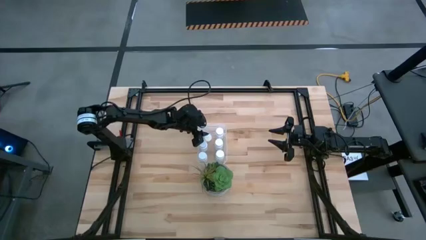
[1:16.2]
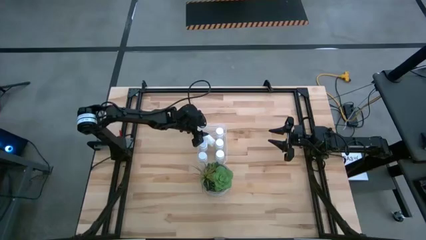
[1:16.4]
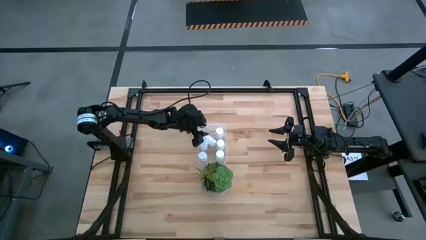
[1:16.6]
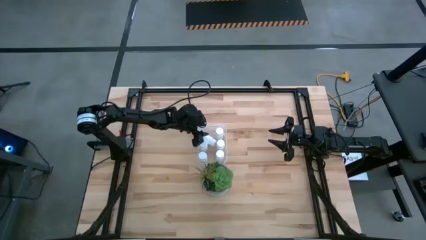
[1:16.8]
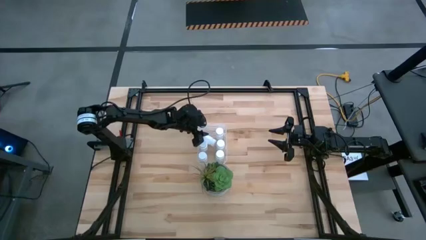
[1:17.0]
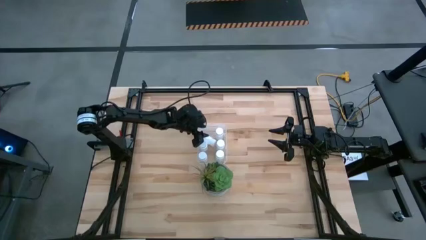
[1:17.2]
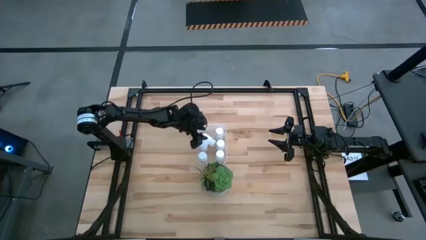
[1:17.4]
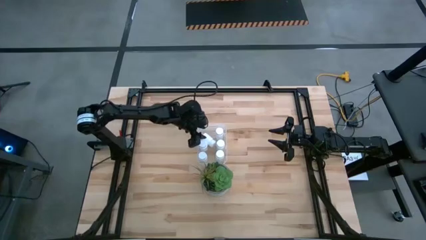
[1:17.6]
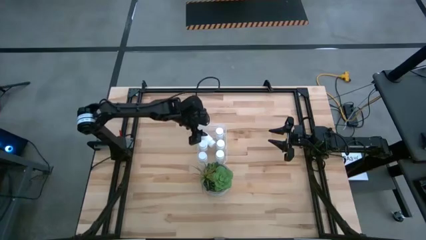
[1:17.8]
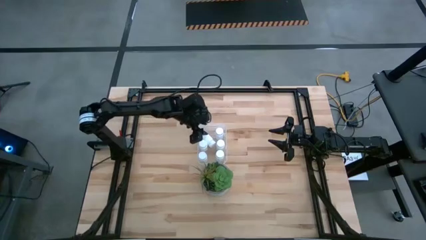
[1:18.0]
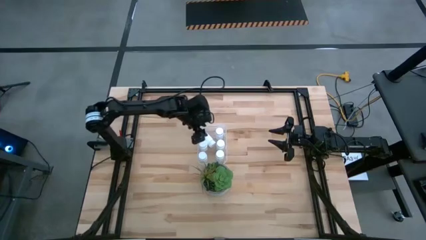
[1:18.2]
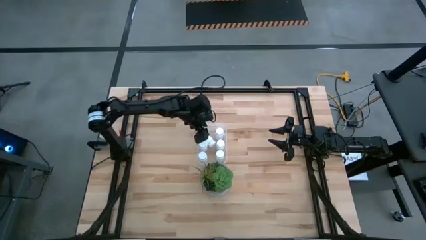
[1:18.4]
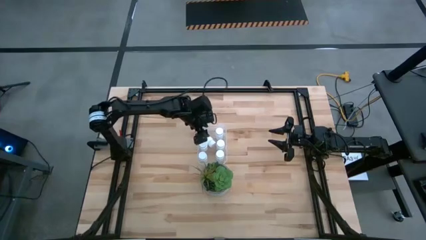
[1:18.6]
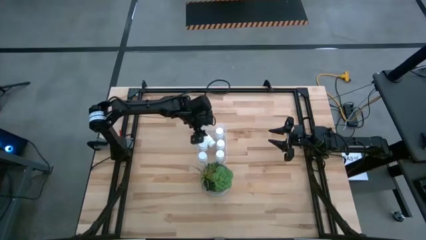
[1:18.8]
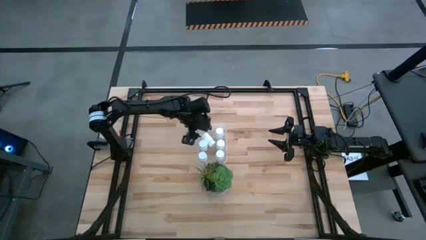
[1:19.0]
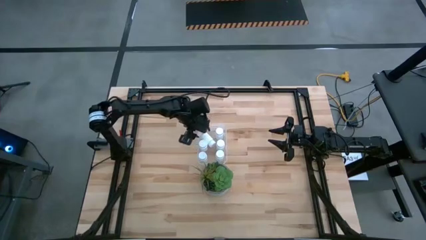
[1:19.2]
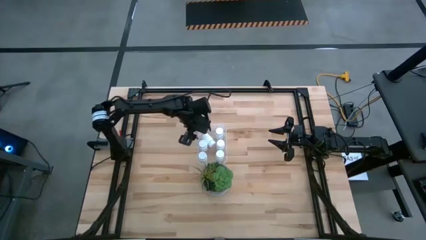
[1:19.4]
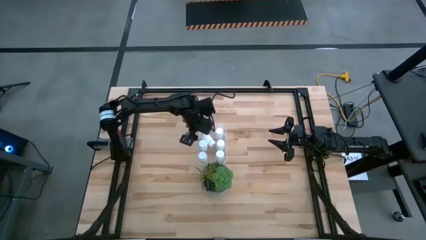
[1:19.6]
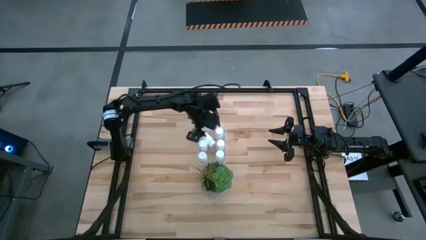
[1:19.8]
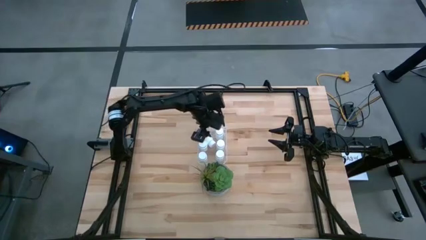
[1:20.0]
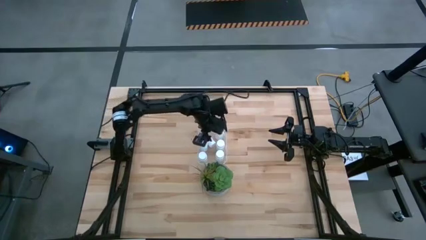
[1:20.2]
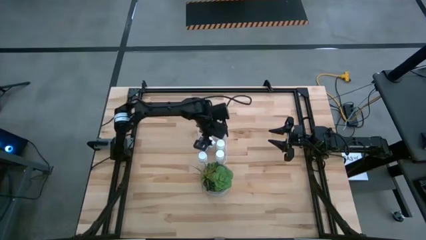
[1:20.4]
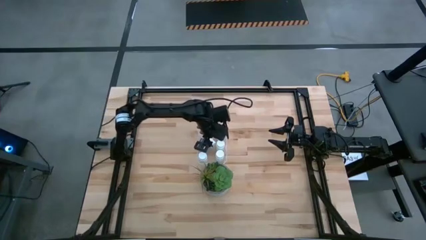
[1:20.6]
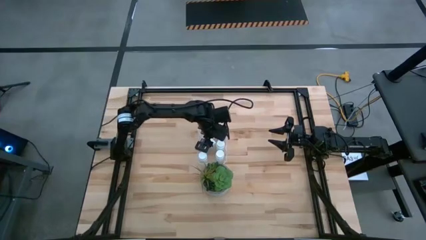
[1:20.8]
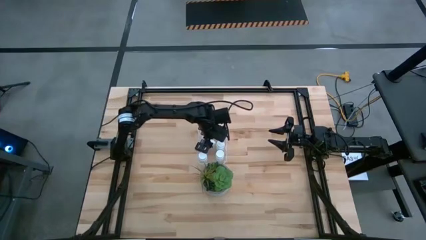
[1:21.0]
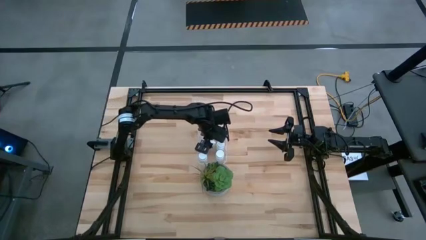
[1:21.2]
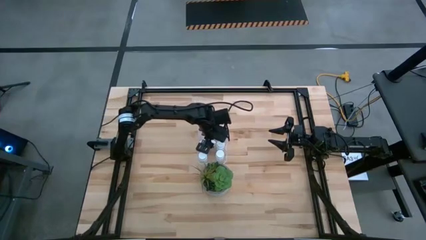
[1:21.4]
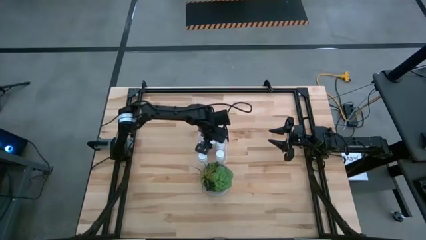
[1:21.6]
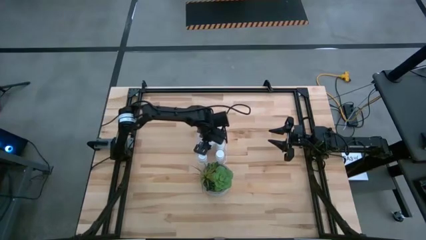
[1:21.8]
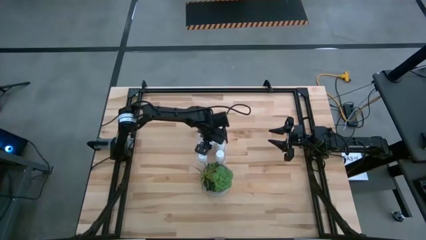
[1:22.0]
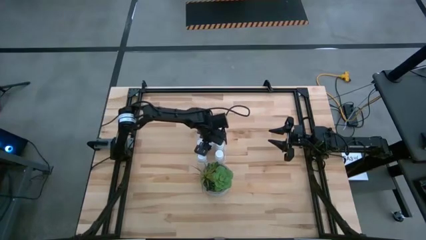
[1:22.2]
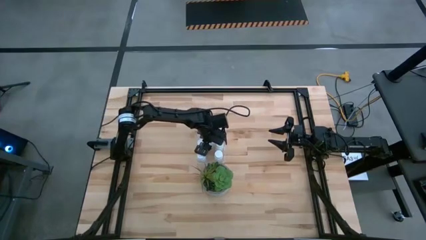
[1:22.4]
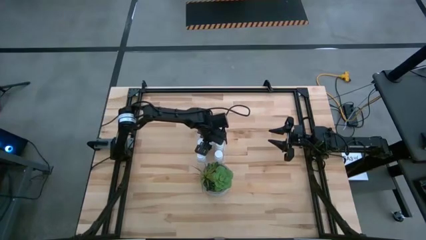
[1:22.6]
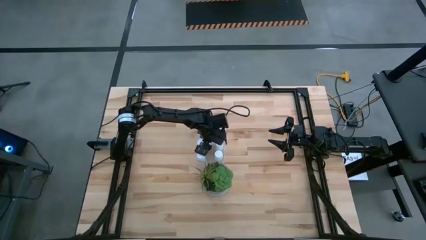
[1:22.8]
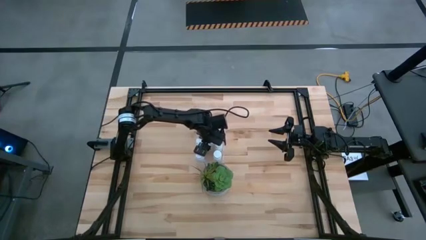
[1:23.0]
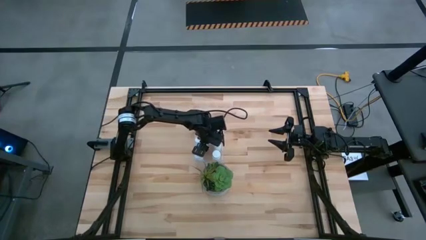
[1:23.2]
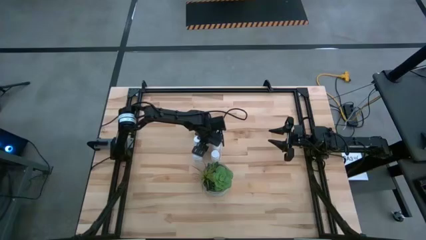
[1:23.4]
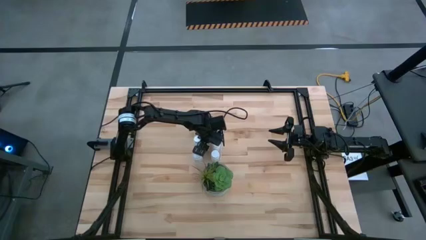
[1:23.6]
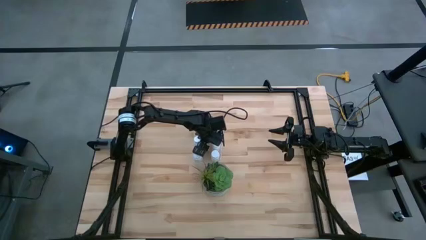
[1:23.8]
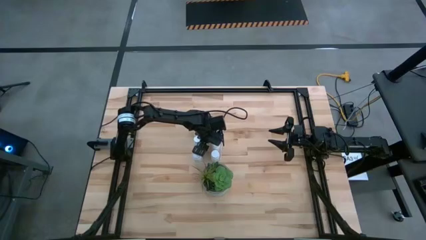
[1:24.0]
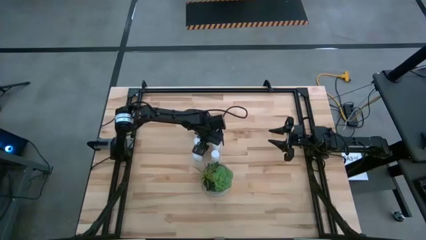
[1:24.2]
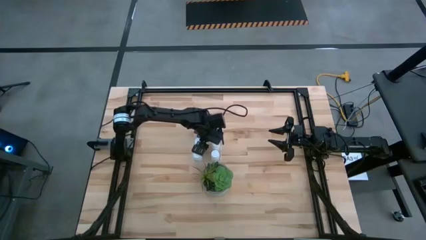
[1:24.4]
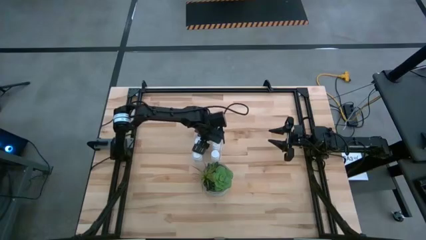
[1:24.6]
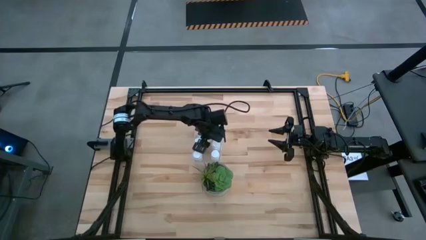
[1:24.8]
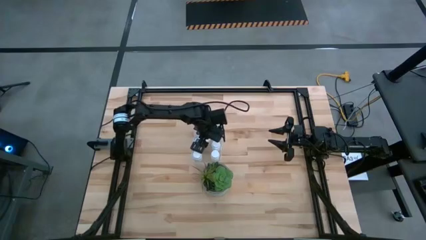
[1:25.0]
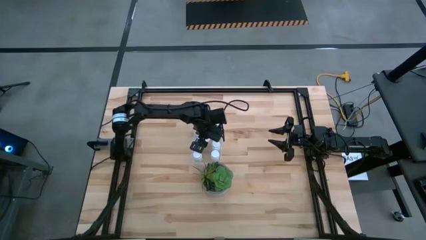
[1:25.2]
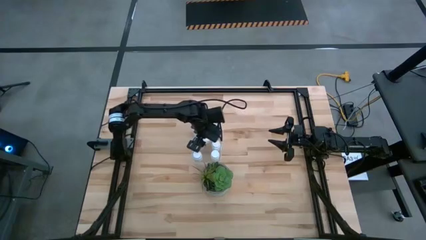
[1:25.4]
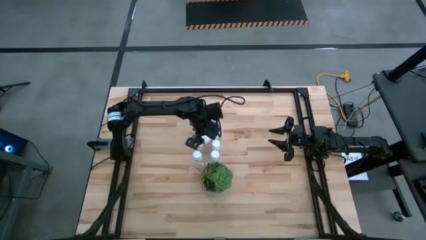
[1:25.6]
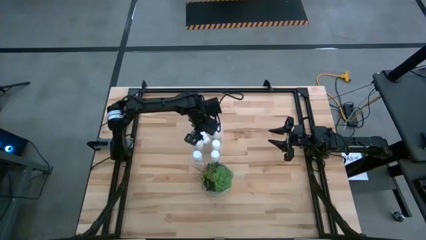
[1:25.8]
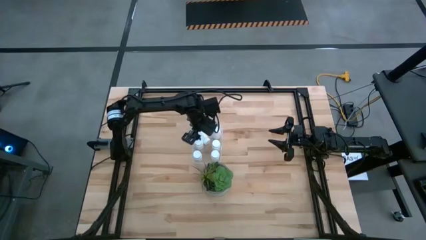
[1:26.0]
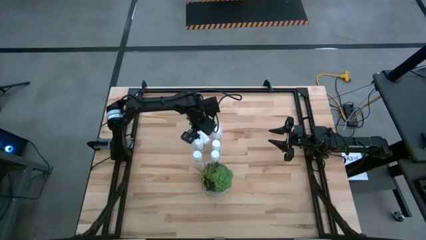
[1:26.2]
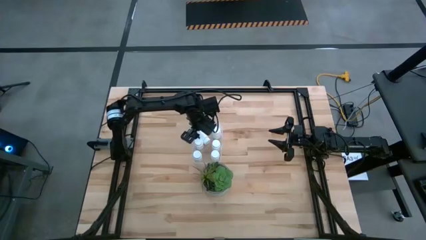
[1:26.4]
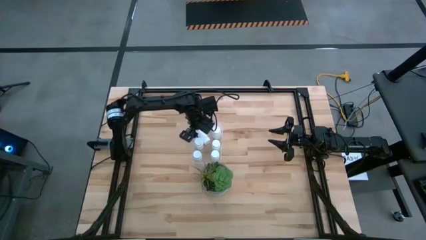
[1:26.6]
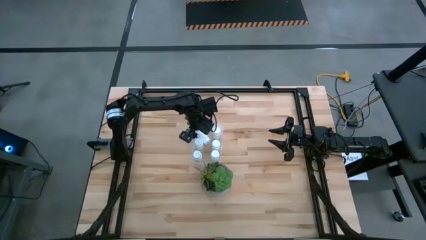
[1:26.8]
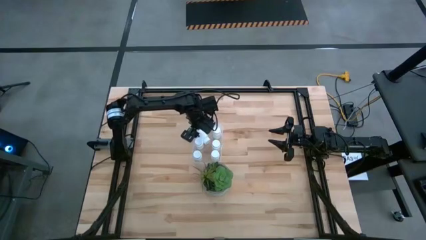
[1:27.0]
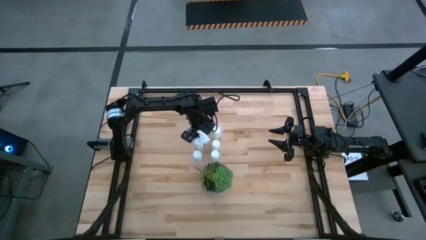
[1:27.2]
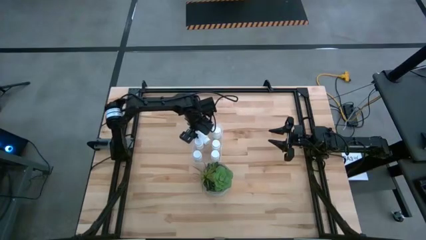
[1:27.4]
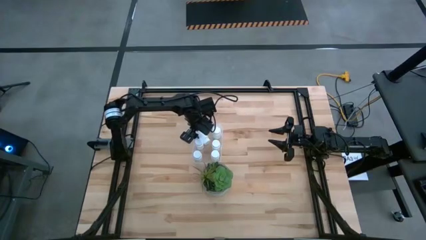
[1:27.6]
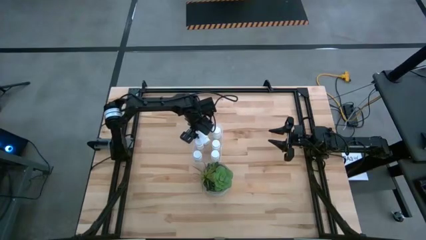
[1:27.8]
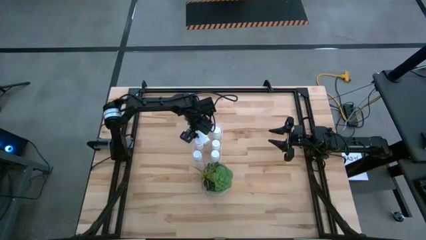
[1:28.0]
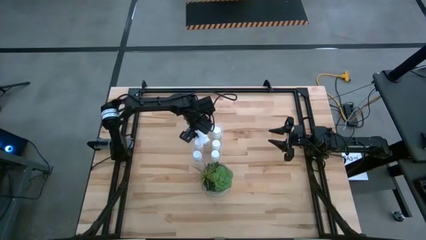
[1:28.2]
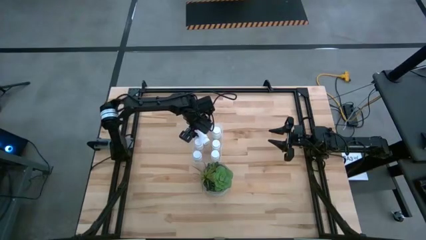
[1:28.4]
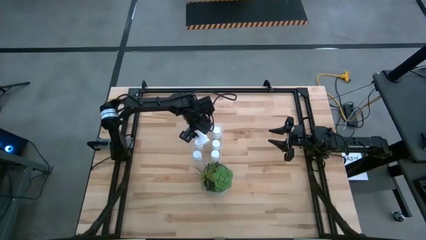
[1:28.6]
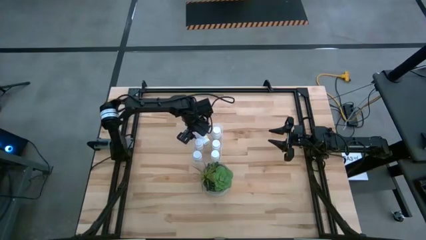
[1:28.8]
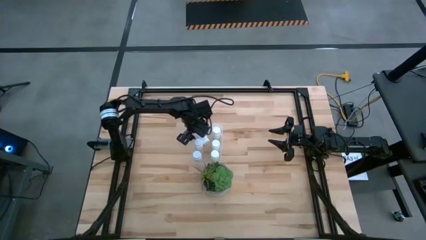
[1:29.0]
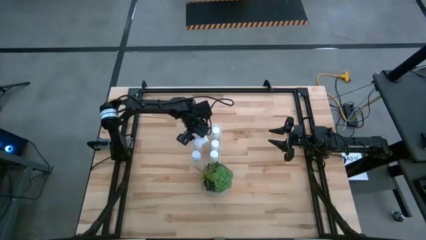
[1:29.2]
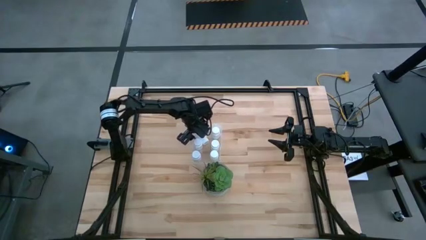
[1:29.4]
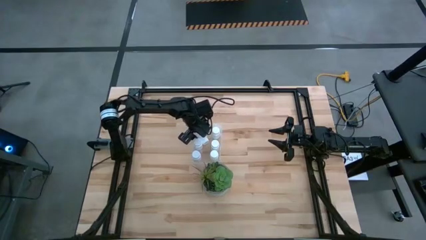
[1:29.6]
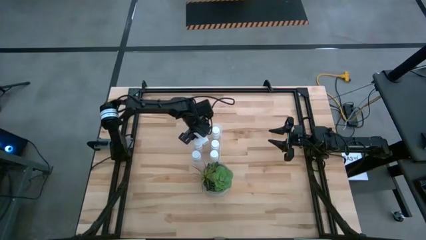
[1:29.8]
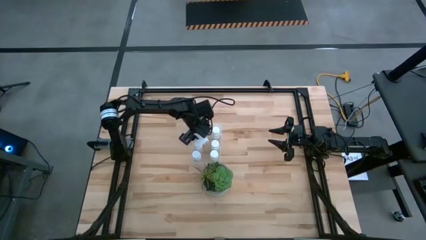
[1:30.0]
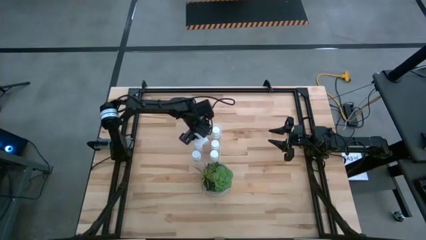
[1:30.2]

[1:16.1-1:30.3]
Task: Pick and place pill bottles into a basket
Put the white pill bottle into the transparent bin

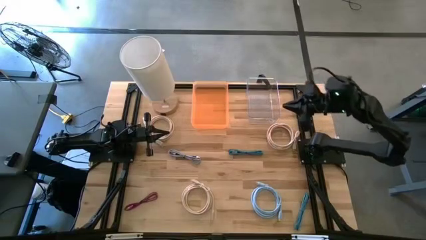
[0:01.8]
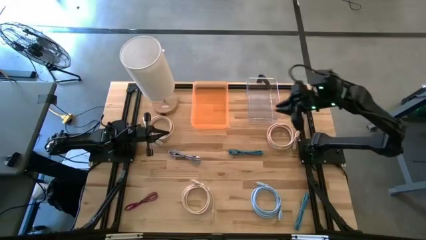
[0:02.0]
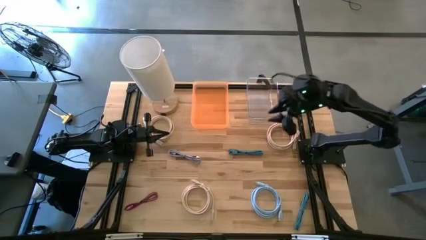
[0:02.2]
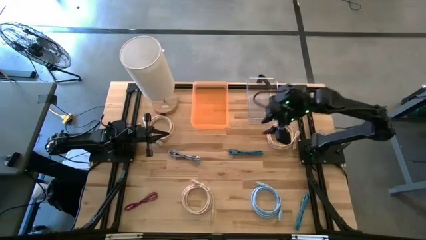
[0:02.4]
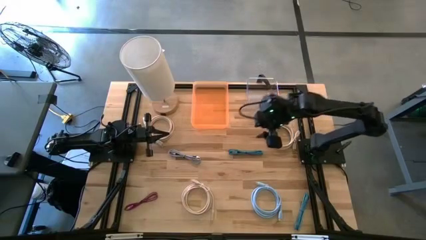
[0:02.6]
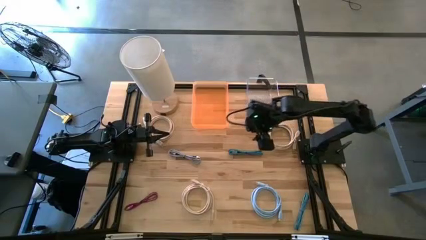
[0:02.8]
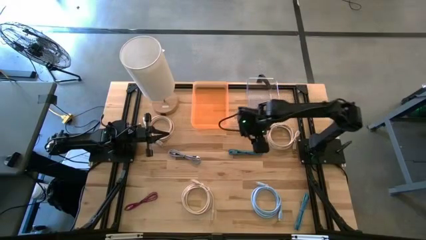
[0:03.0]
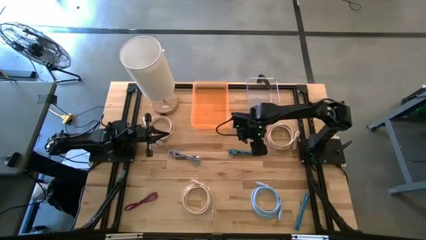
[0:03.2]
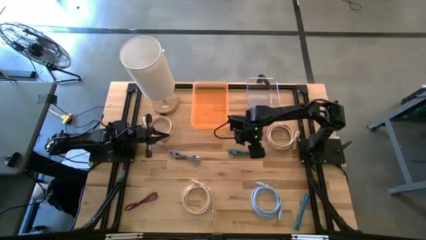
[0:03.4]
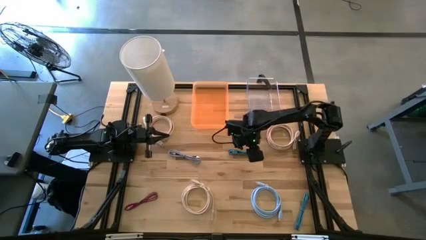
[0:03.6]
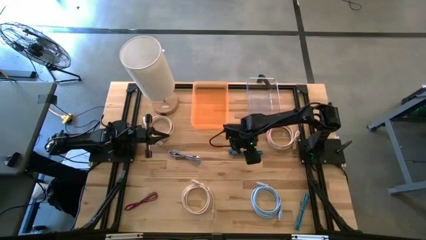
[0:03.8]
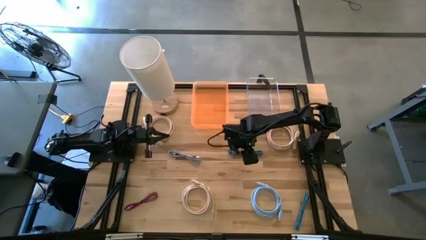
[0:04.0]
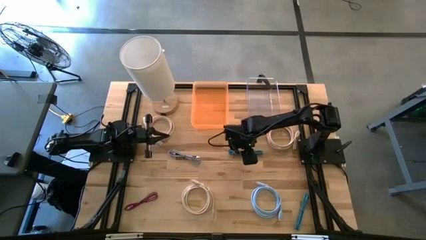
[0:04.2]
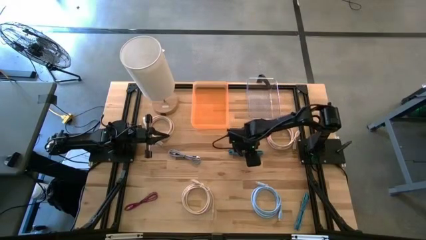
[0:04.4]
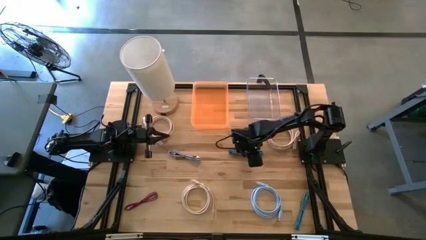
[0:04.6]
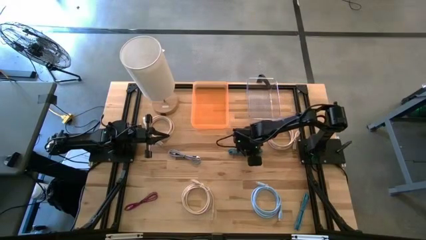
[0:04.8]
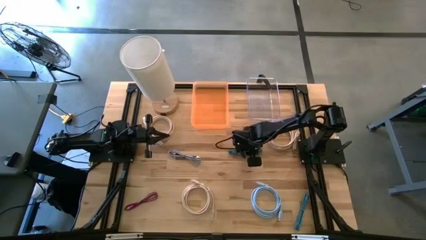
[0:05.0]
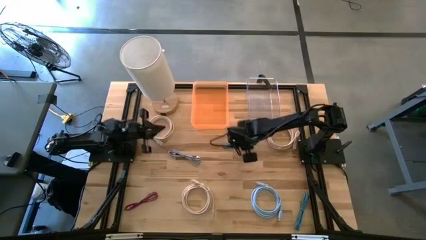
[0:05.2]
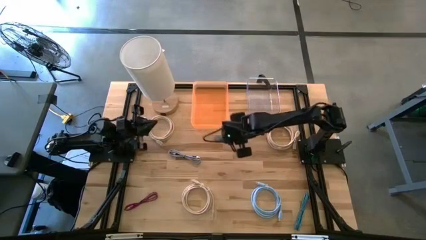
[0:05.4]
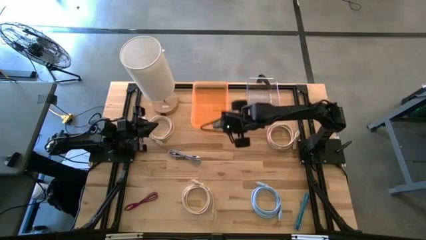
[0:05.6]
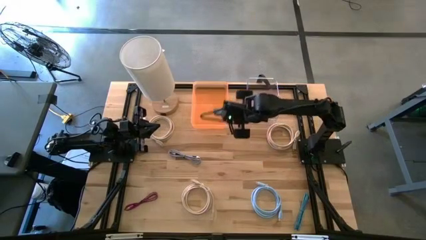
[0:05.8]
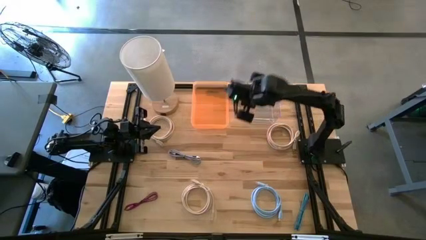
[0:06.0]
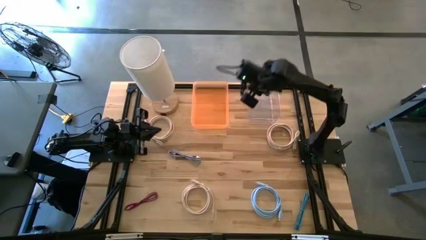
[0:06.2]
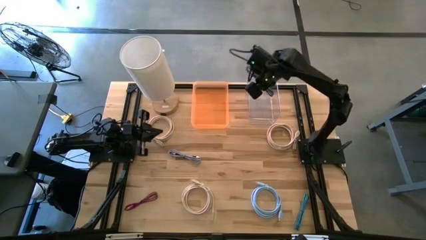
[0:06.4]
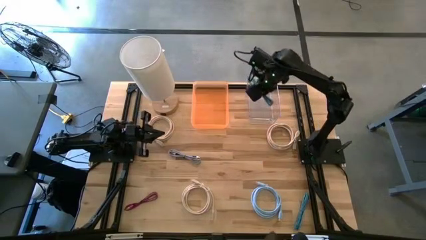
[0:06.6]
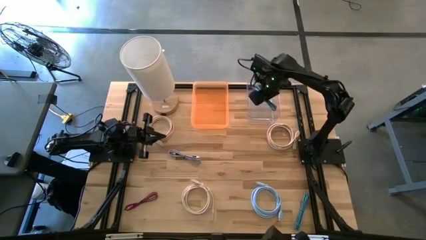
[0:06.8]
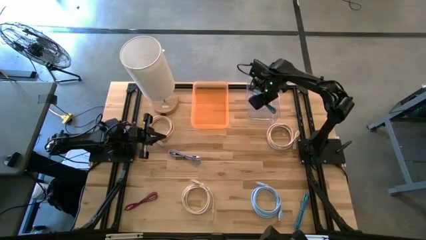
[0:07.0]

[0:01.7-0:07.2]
Task: Pick & Place USB Port
Put the top black blue charger cable into the transparent bin
